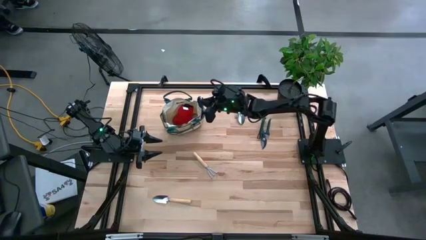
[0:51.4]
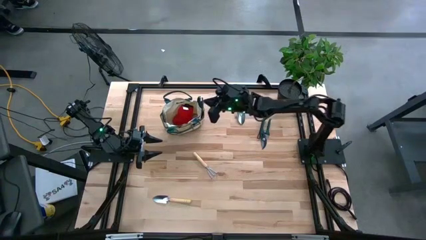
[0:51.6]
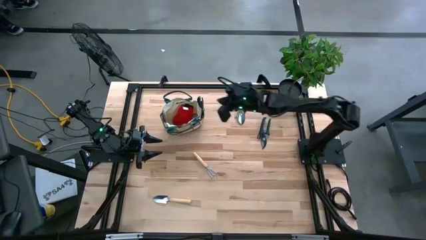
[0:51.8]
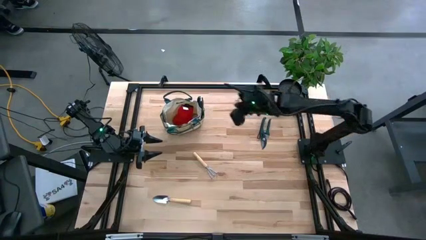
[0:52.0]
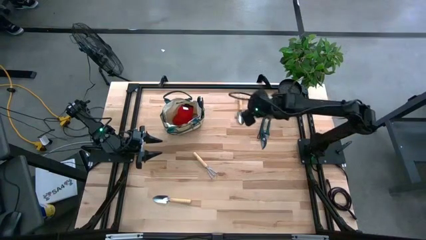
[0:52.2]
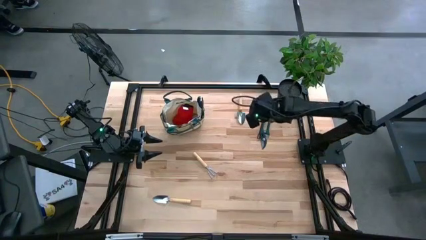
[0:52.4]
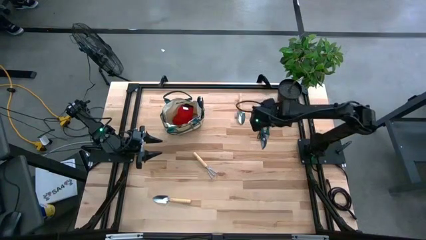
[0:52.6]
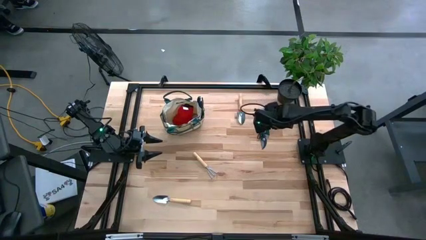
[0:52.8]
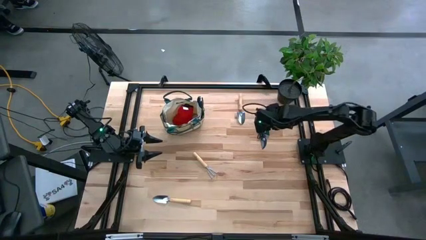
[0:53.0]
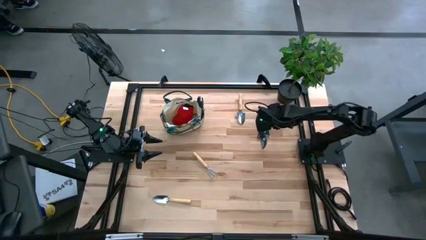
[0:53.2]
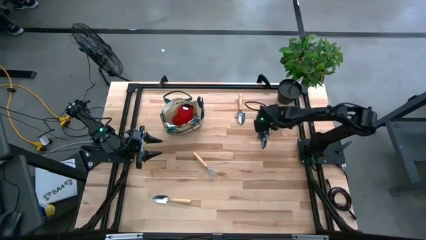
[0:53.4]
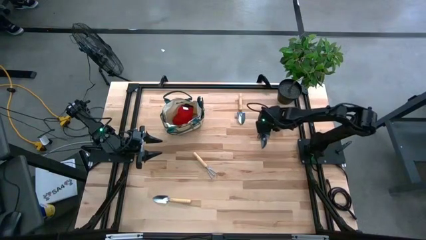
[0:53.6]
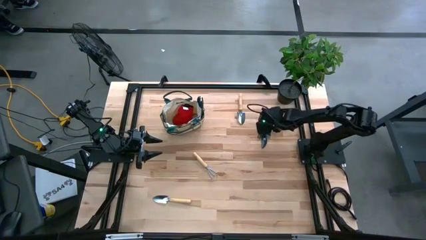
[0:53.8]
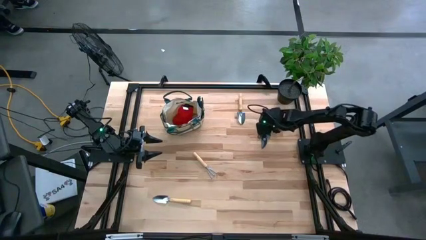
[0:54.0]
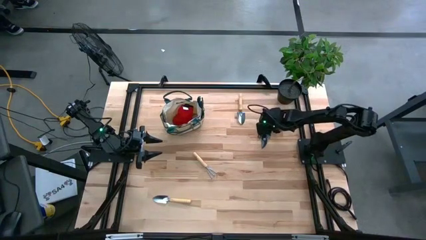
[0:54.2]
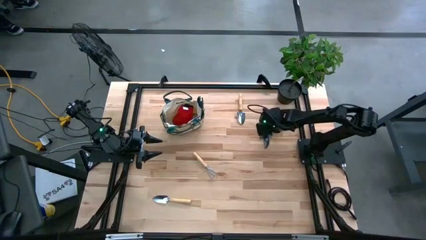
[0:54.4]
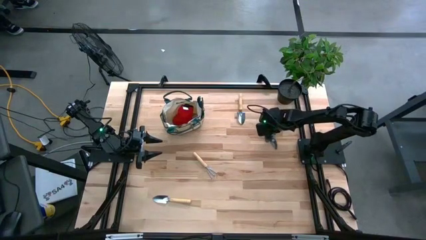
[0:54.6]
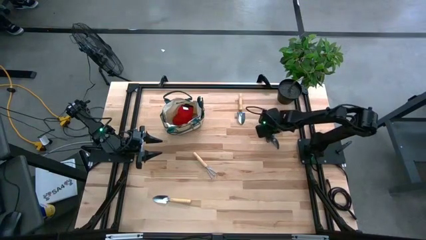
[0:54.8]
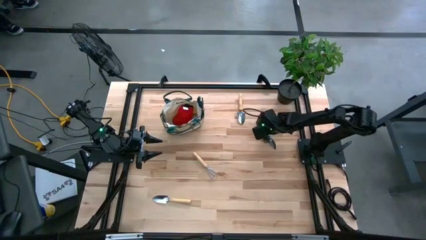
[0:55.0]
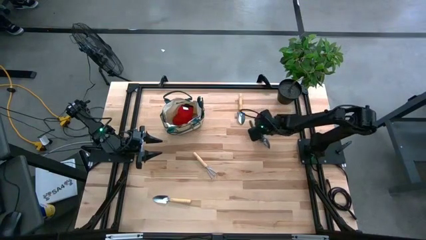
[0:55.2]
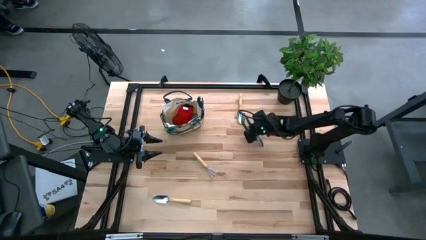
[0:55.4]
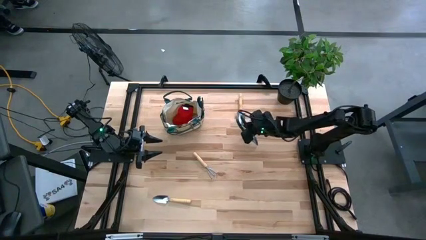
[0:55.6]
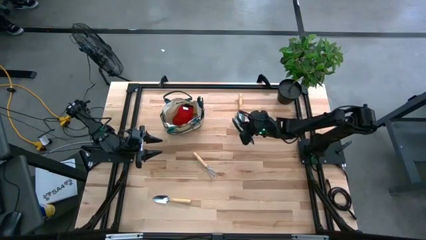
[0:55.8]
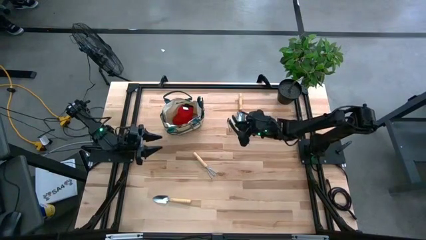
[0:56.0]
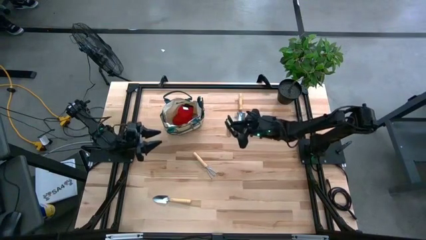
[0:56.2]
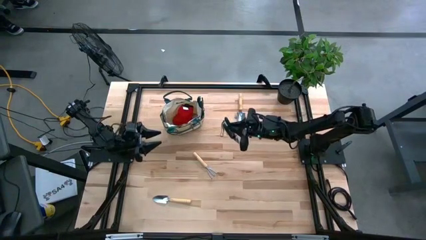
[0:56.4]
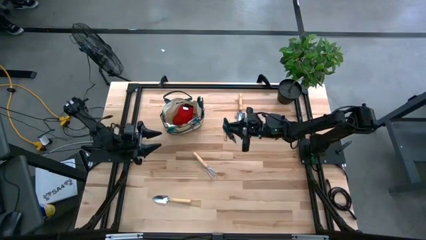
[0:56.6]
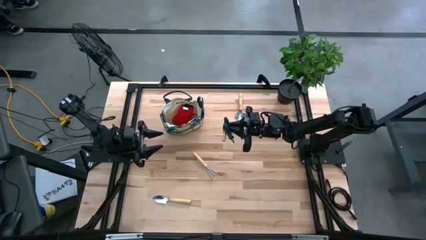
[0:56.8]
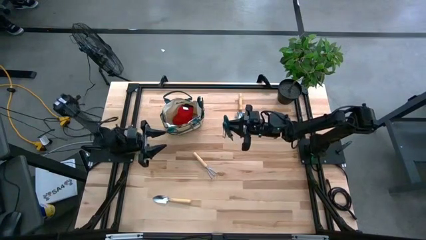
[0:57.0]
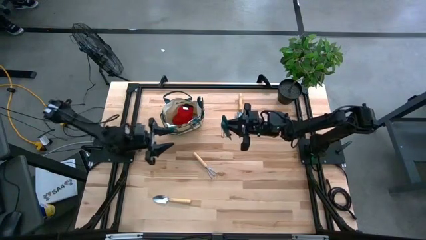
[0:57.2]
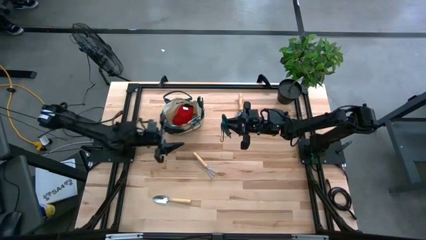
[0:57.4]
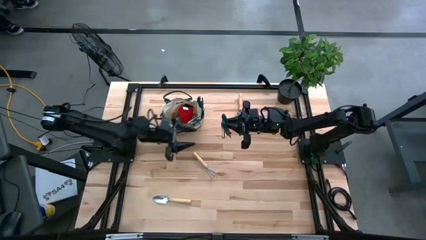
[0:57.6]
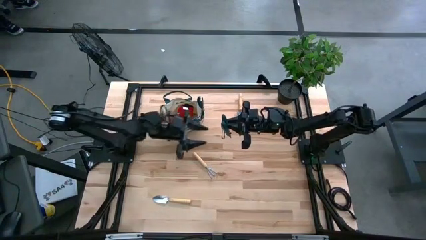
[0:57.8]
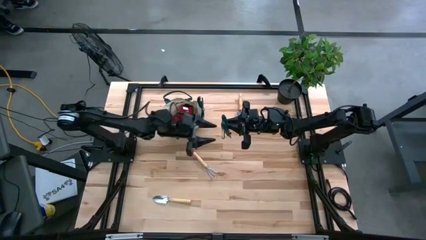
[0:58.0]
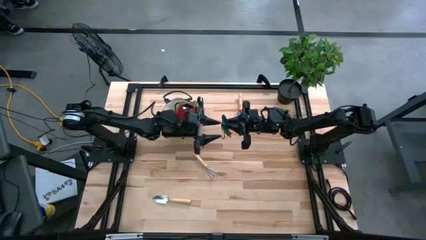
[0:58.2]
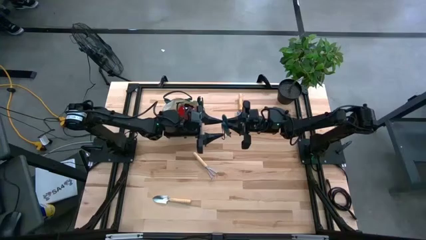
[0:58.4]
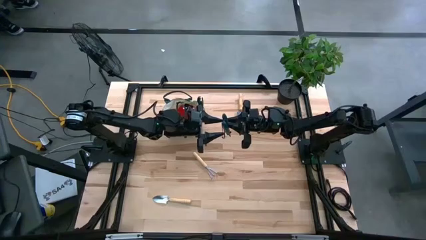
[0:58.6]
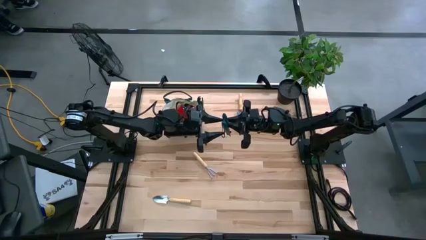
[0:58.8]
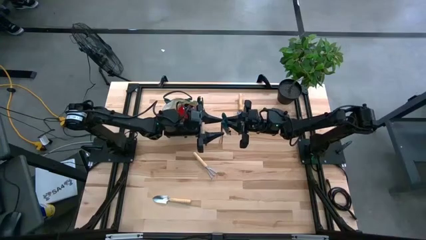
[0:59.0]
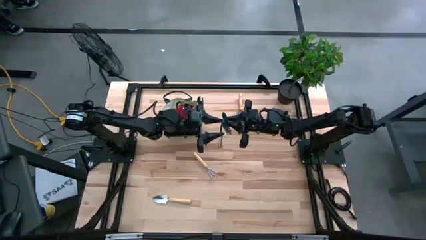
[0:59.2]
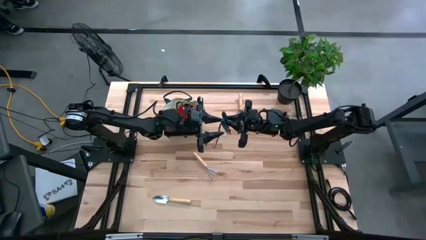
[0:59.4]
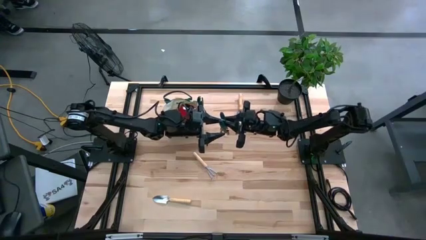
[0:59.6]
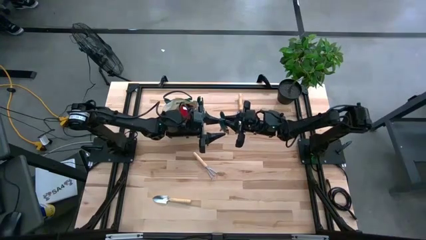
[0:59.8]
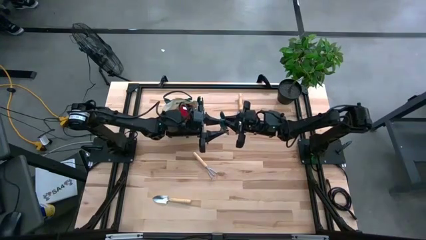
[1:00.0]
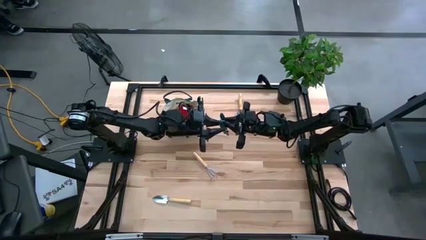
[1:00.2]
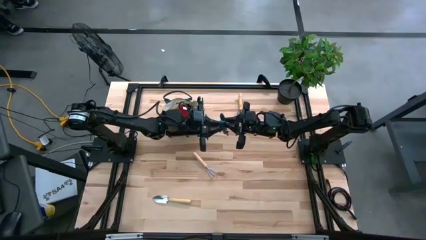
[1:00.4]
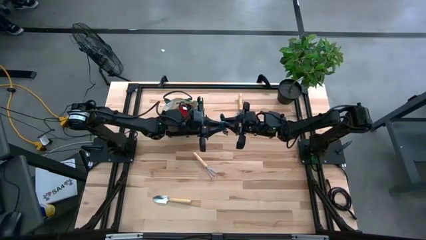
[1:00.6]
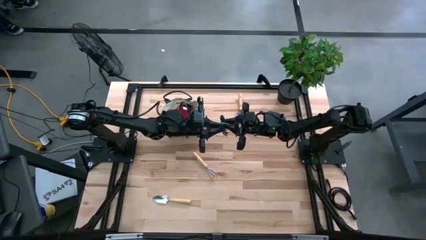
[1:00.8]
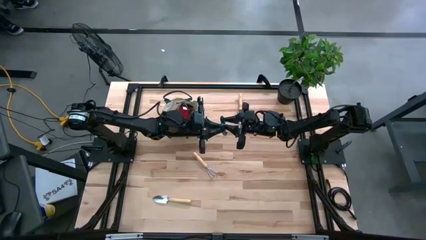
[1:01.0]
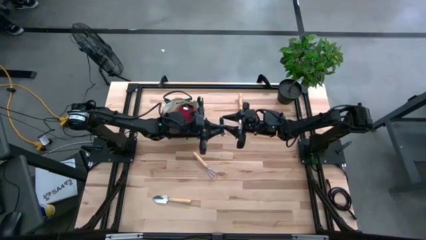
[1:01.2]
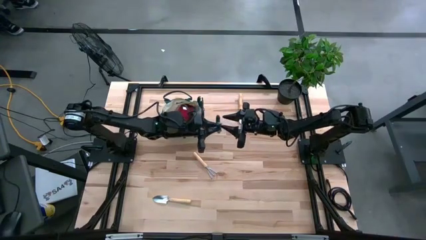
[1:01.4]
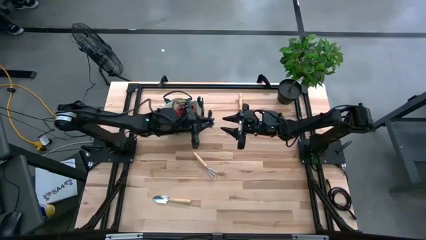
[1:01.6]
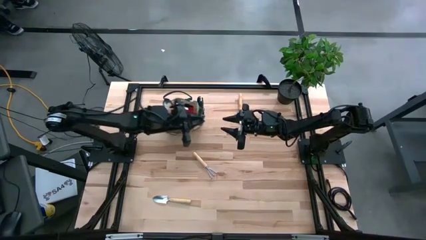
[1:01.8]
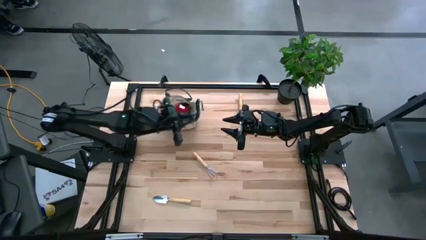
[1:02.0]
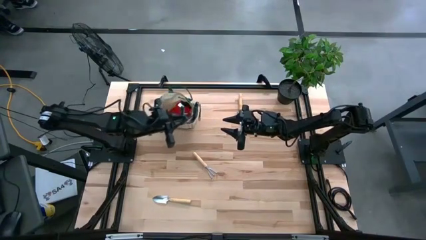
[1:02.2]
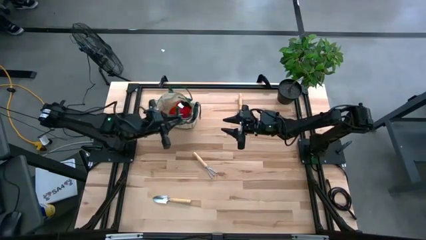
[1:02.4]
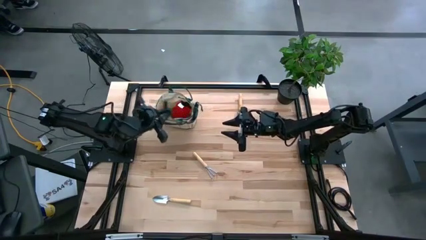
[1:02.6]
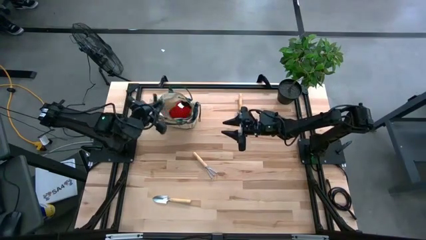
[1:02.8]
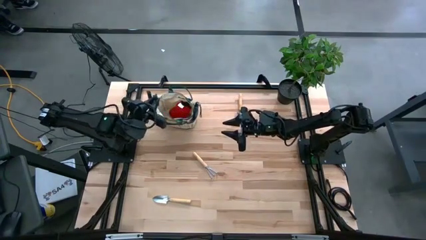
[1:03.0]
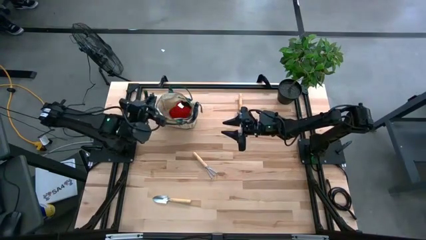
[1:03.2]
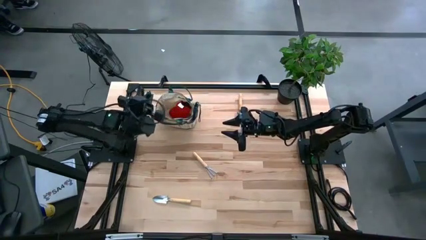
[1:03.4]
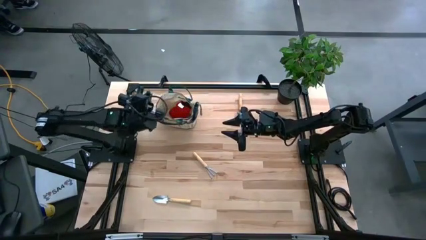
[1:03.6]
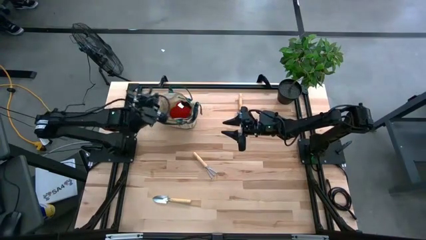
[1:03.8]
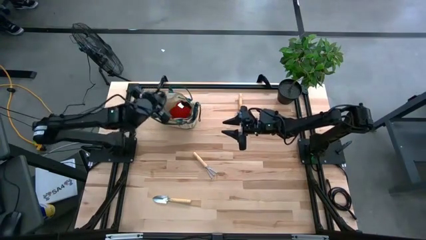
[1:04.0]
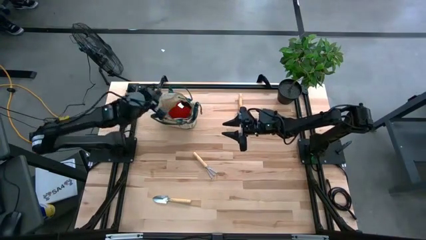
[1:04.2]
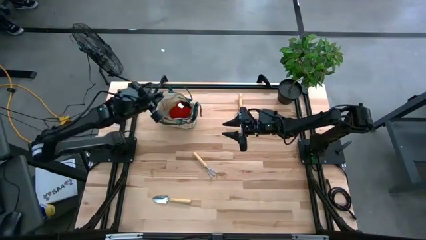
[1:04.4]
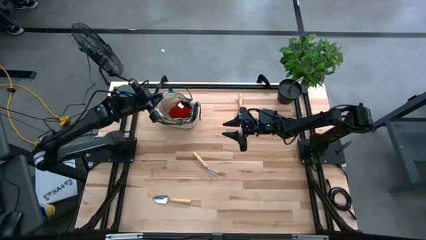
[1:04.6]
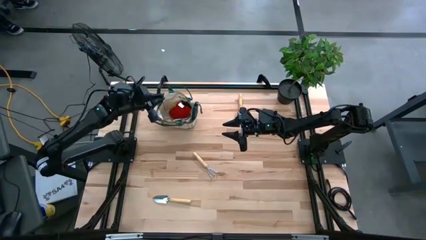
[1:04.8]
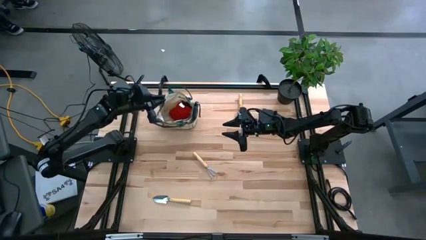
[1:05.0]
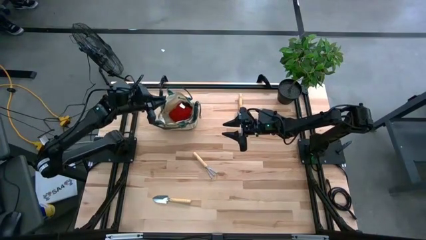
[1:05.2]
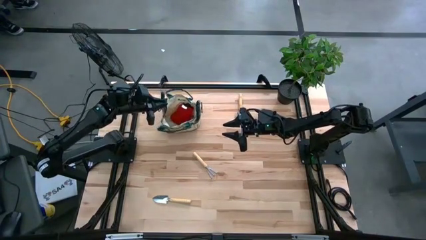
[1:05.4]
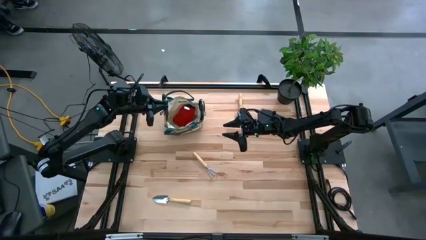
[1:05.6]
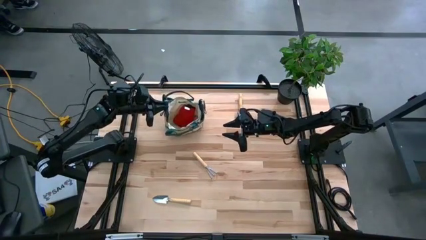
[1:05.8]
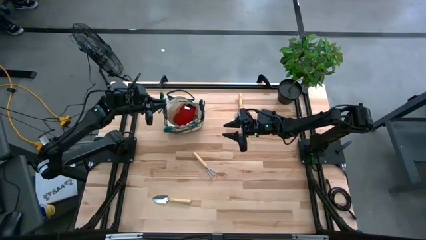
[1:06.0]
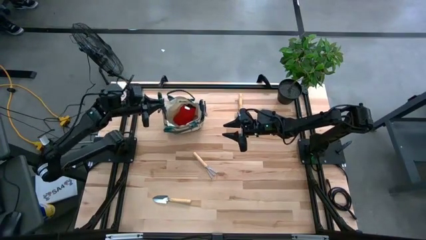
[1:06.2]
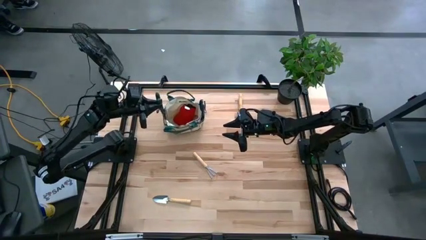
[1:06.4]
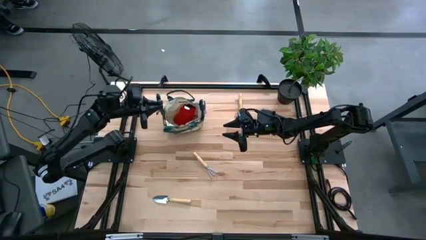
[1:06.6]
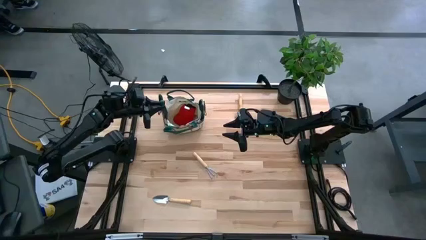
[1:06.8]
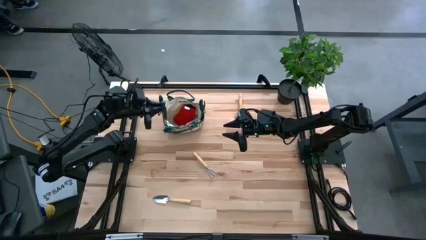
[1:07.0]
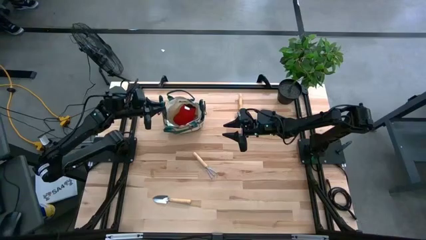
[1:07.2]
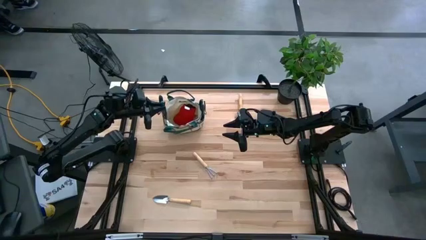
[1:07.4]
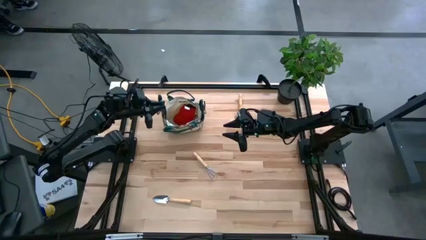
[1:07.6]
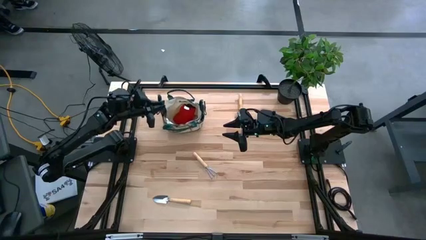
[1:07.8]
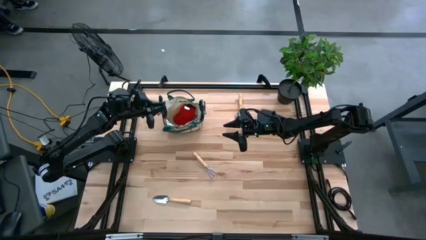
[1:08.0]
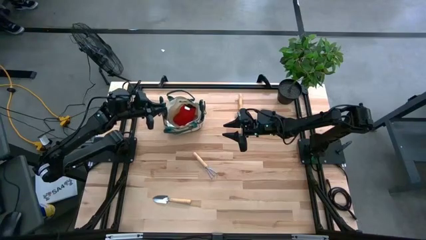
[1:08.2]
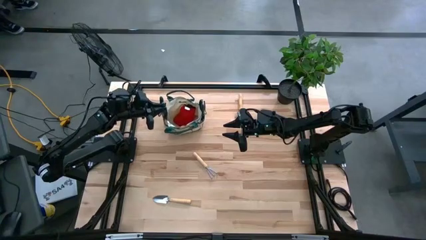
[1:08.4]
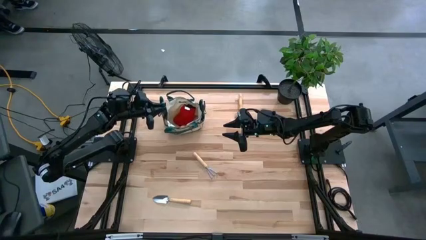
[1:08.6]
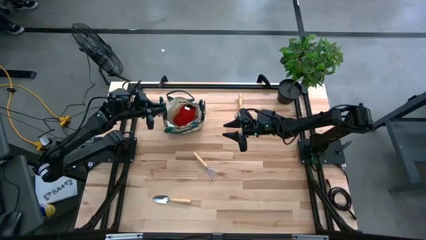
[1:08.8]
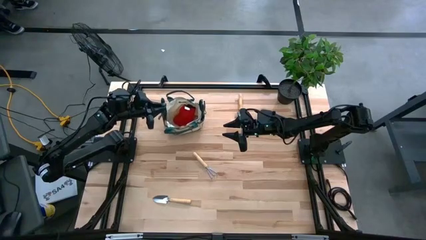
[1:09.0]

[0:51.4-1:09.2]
Task: Pick & Place Garden tools in Gardening bag
Put the green shears into the gardening bag
